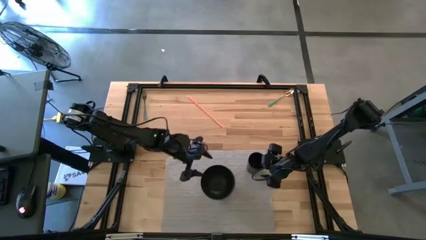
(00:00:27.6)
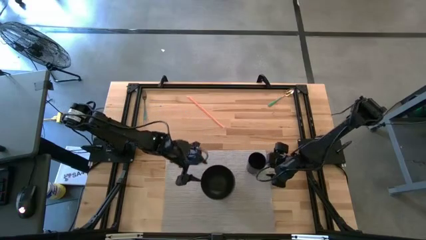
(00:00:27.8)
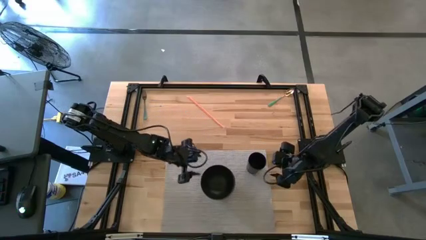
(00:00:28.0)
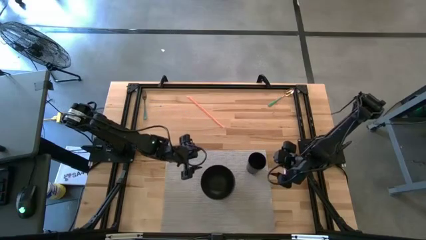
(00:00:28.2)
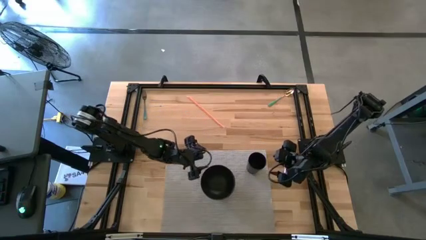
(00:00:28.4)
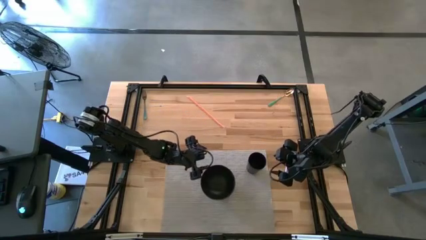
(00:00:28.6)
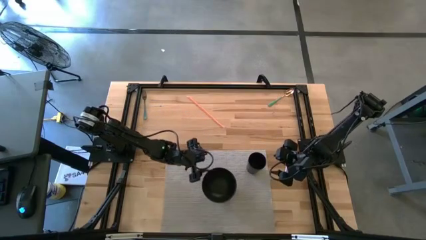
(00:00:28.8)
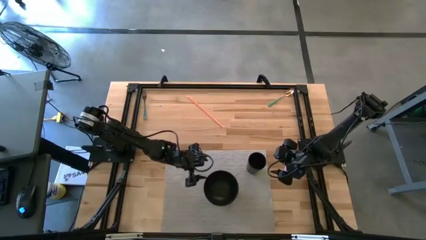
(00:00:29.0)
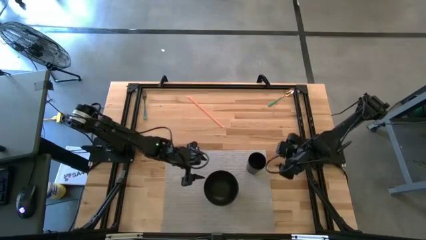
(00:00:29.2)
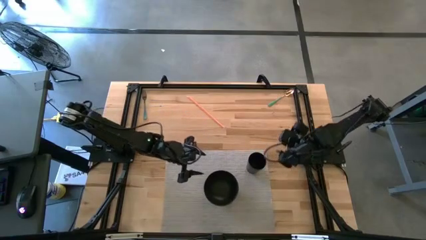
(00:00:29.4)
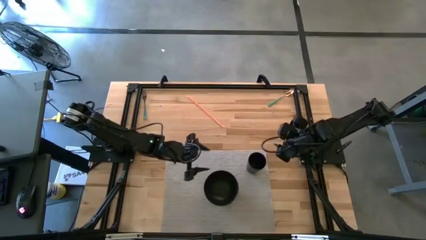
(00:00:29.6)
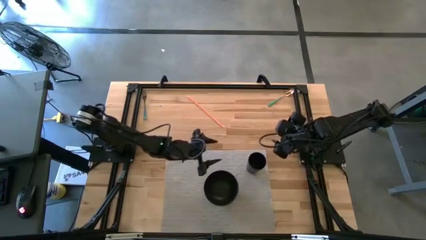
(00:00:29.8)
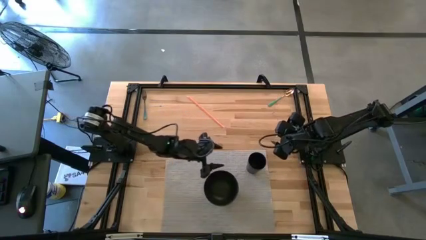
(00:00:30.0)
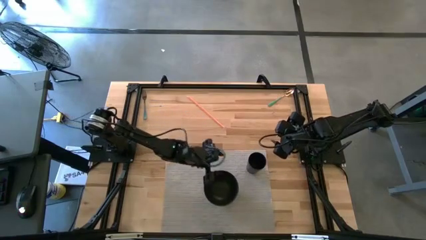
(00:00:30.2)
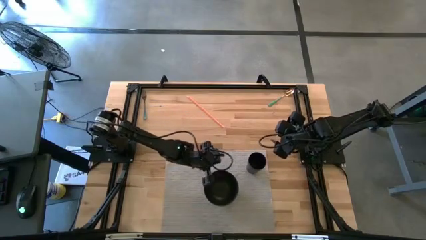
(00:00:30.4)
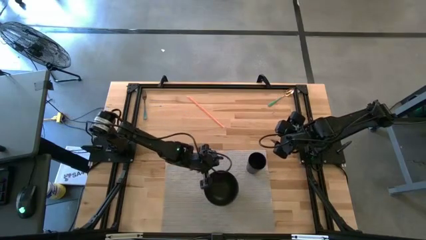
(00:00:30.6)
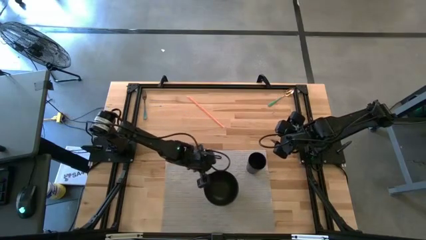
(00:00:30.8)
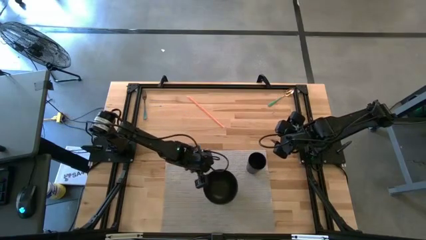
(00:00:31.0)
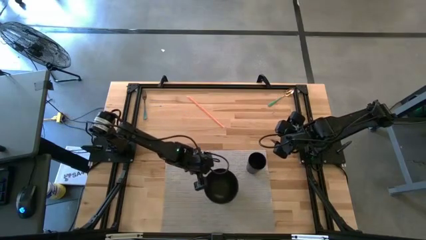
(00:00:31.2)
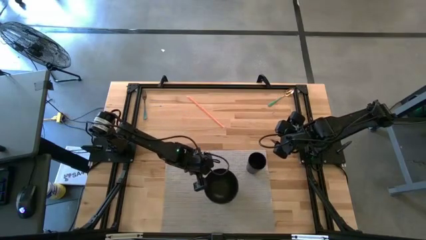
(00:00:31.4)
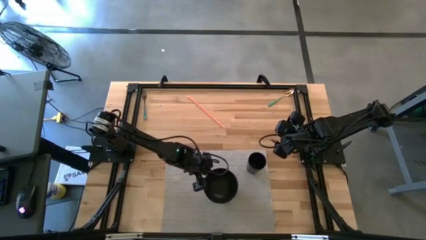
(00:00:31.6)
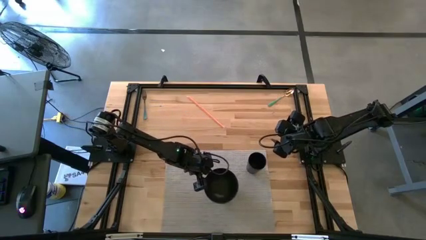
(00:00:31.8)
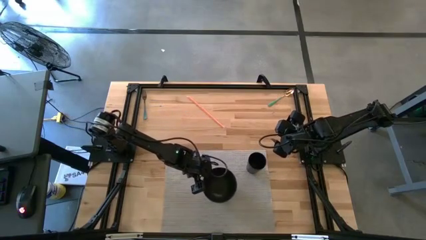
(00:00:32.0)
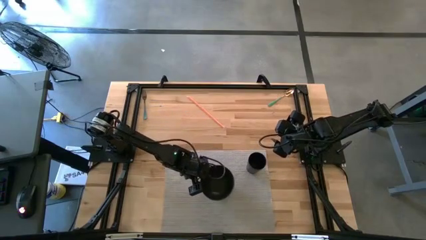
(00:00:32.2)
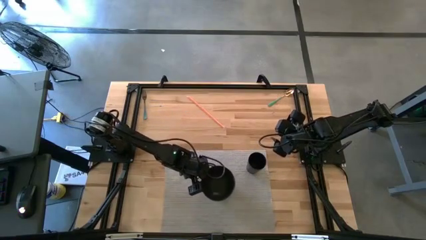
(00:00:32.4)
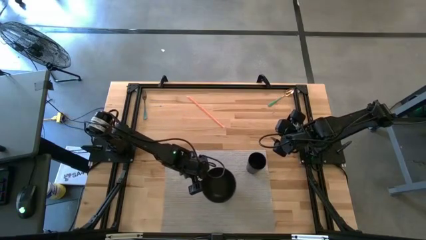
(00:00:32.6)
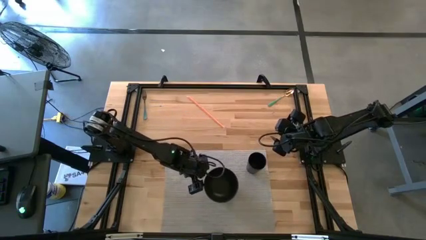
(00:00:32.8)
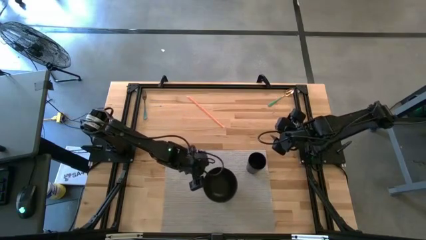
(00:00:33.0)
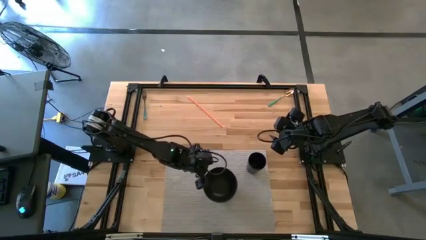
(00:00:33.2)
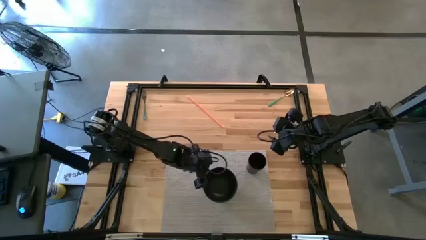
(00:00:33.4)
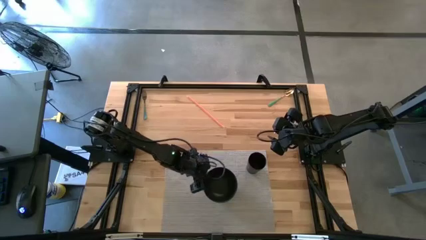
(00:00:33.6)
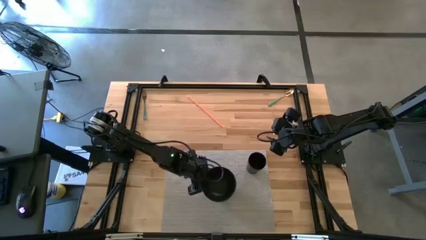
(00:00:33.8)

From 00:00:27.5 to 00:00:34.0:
Task: Pick & Place Utensil
Adjust the black bowl on the table mat

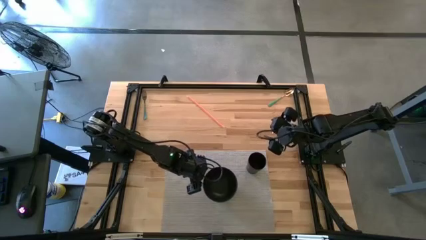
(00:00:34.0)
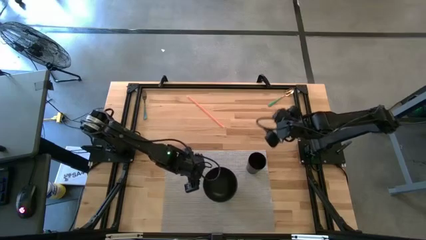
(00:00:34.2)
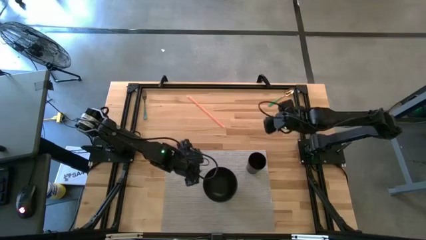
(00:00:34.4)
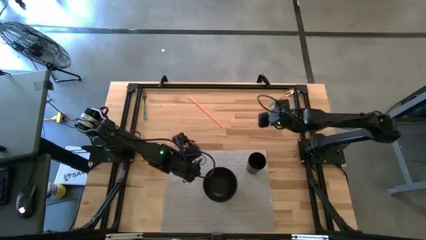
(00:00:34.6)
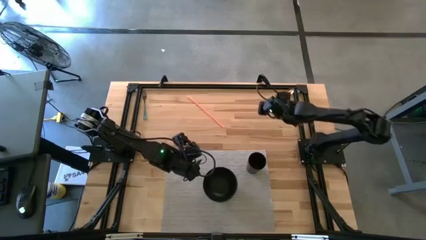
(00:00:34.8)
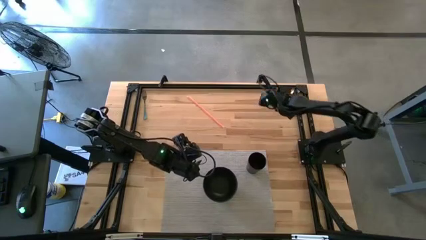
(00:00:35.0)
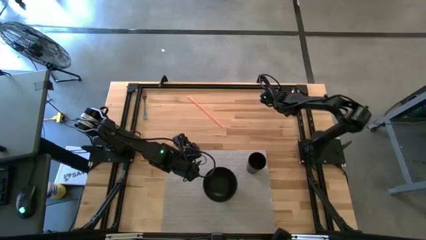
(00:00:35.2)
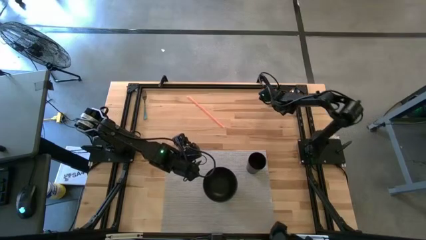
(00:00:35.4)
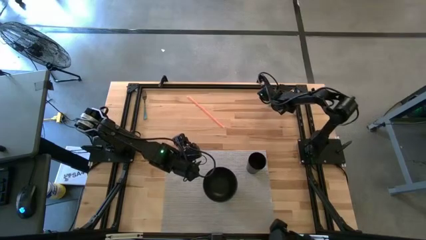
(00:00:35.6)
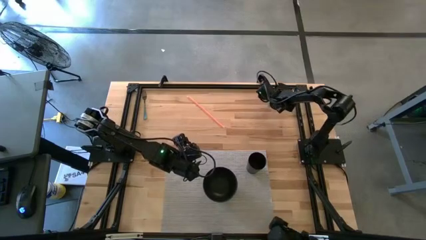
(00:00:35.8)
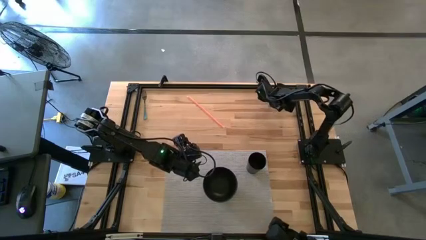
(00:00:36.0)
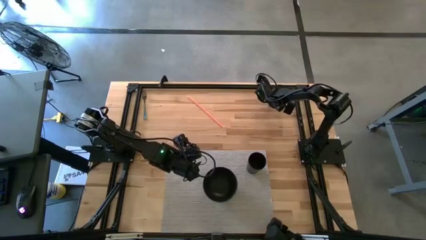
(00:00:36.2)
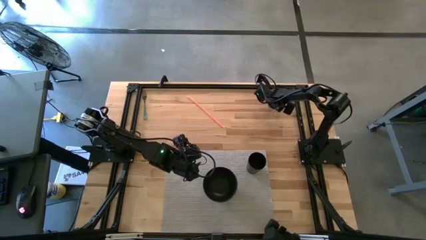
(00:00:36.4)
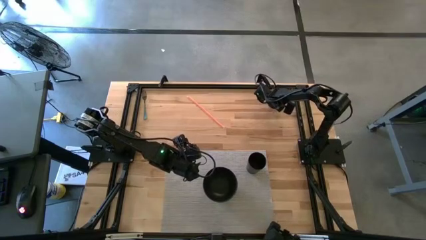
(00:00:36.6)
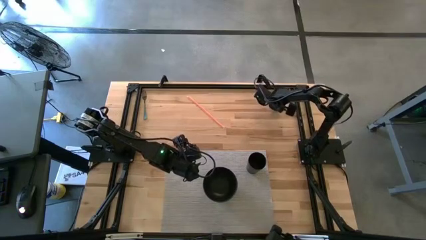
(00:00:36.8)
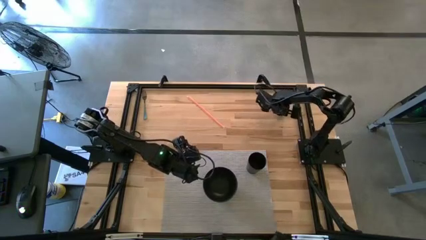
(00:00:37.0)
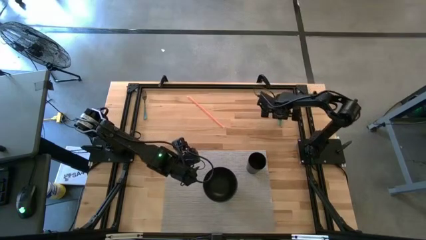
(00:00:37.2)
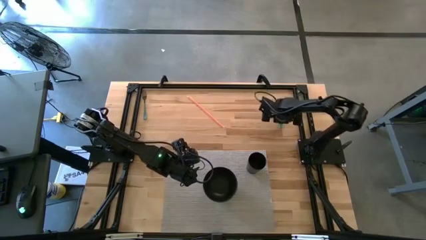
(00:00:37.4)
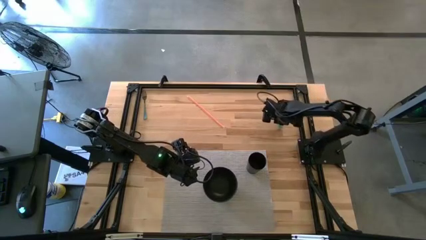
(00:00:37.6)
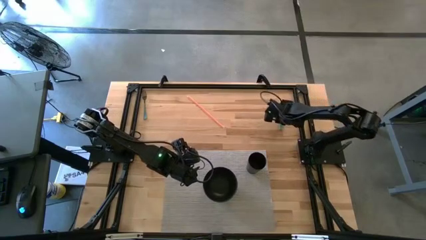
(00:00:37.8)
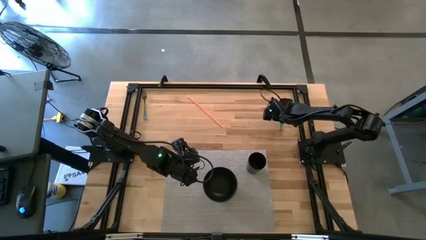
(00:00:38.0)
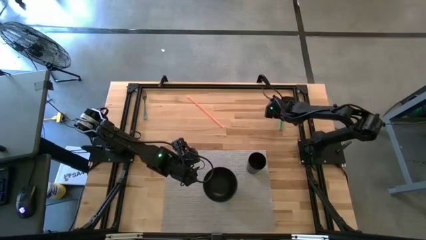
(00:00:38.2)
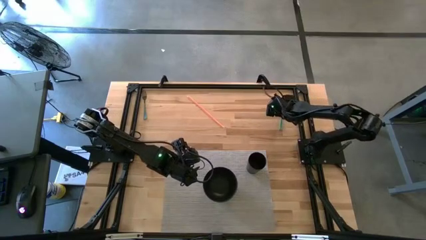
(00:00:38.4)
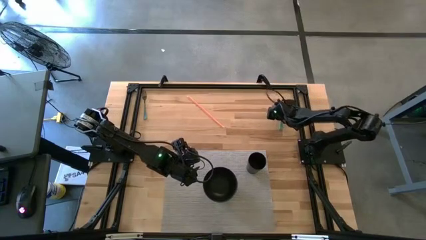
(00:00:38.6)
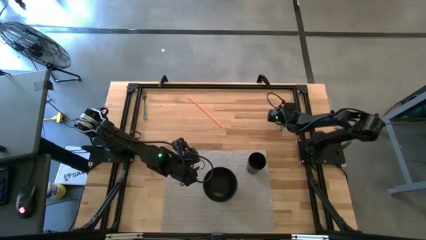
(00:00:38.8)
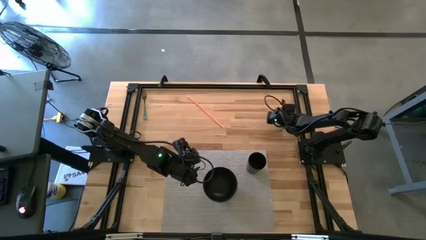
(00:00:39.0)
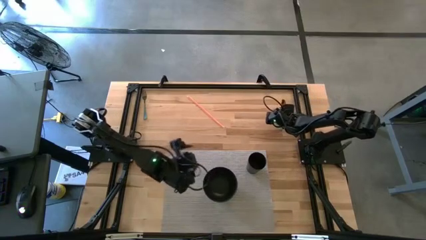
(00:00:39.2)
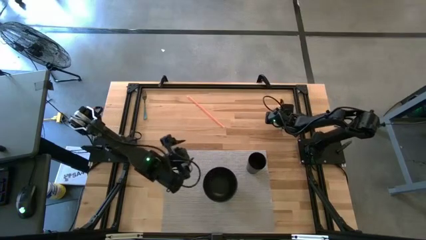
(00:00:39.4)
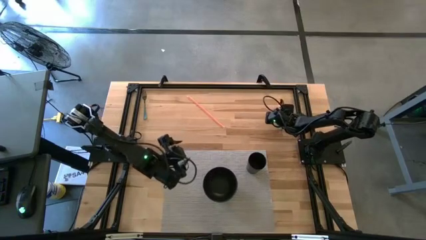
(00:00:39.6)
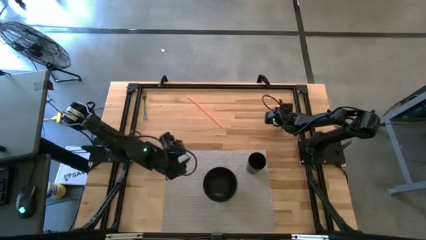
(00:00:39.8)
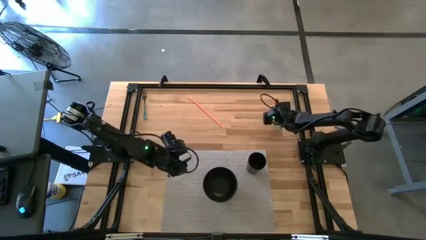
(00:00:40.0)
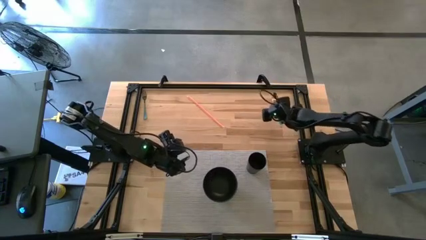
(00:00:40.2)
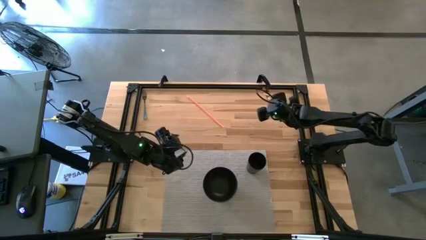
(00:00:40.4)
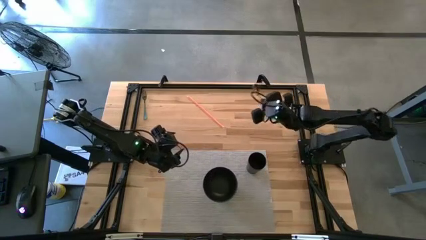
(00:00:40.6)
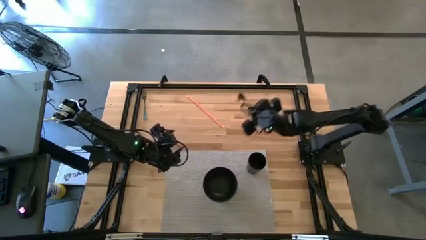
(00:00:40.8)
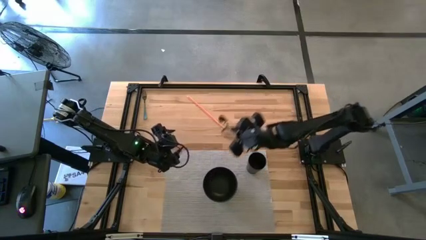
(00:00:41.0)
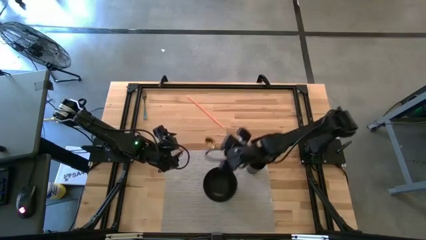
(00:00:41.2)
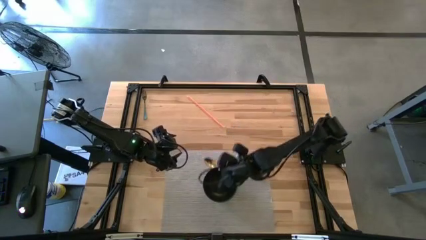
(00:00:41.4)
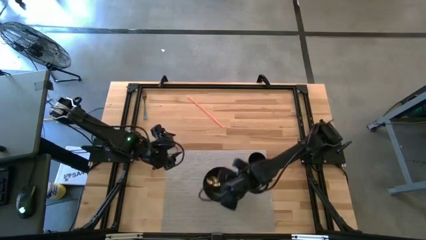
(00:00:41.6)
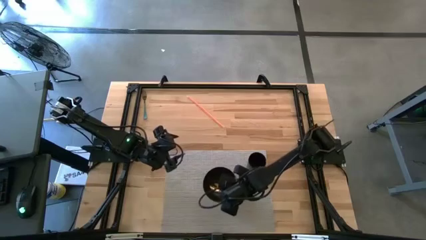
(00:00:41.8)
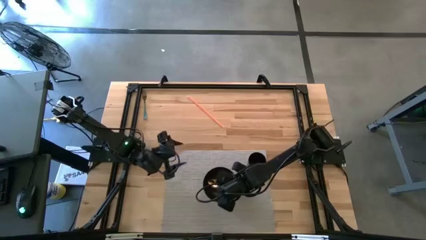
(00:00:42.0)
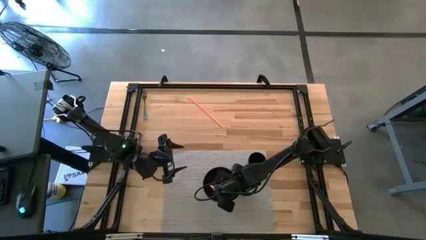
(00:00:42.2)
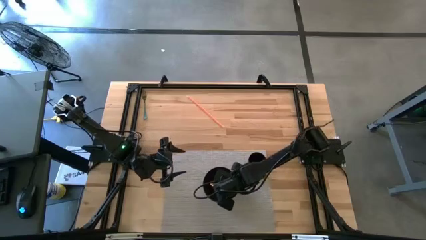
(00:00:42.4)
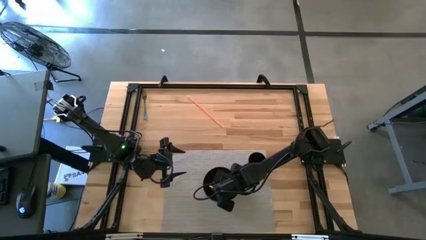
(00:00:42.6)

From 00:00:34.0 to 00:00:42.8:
Put the green spoon into the black bowl
